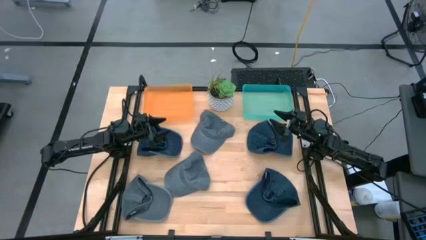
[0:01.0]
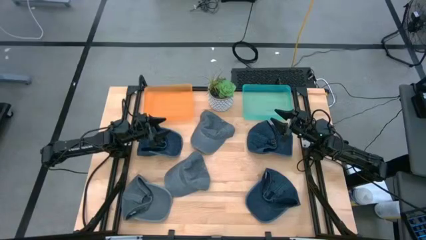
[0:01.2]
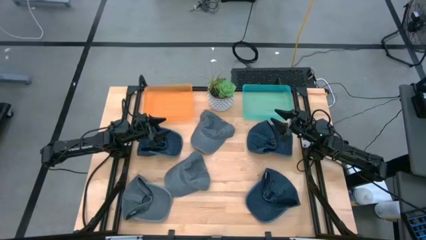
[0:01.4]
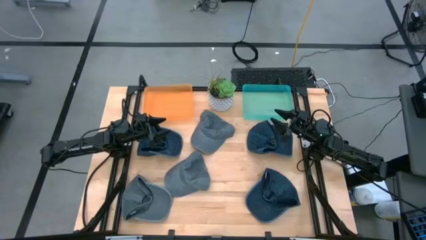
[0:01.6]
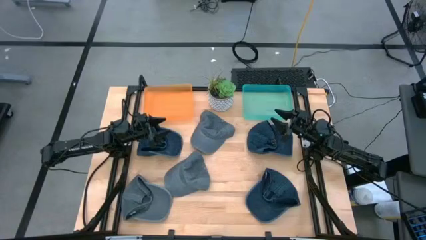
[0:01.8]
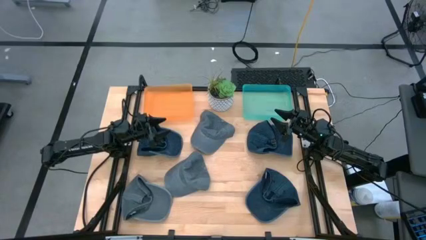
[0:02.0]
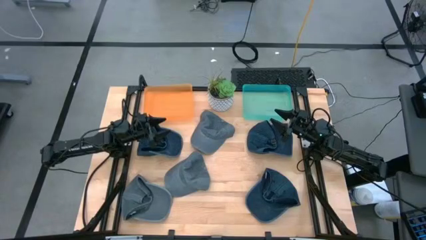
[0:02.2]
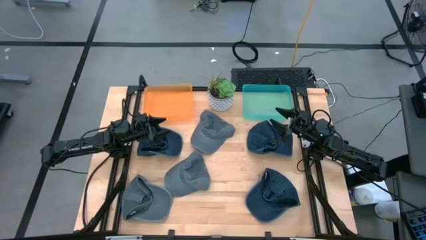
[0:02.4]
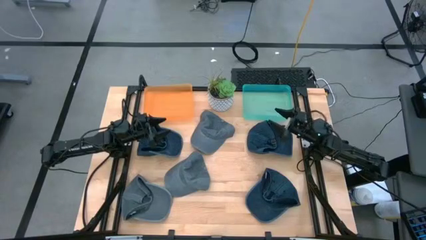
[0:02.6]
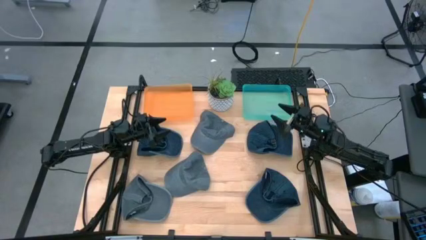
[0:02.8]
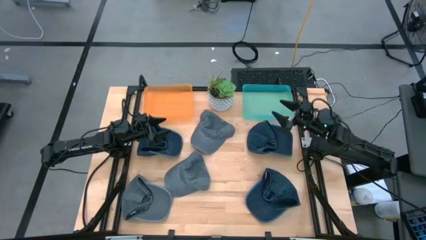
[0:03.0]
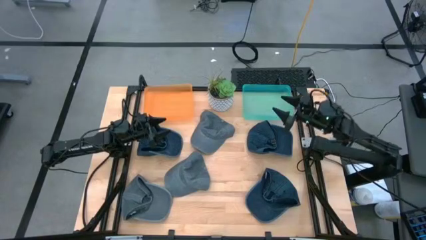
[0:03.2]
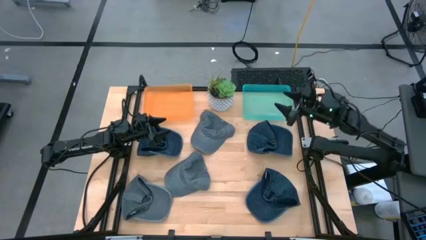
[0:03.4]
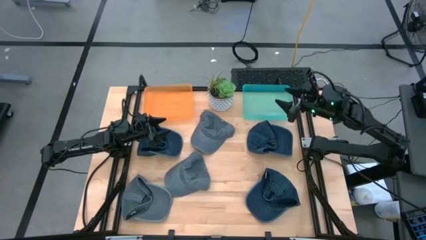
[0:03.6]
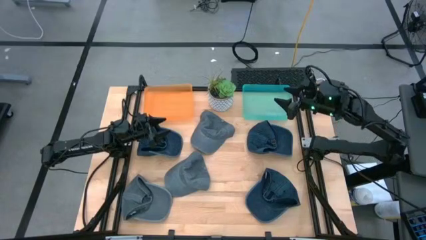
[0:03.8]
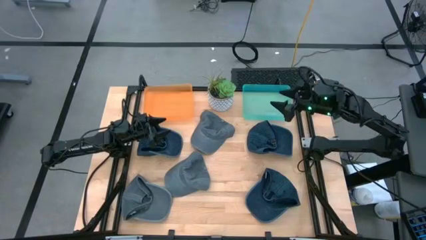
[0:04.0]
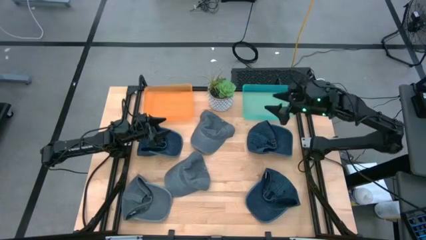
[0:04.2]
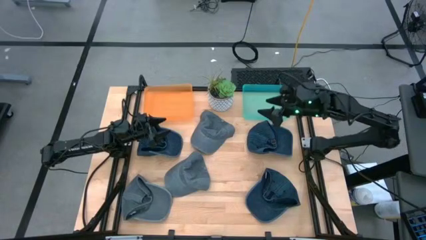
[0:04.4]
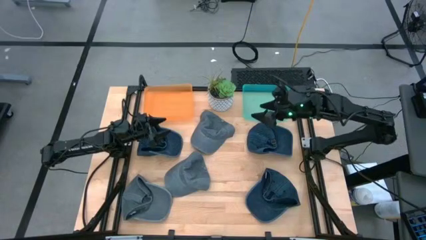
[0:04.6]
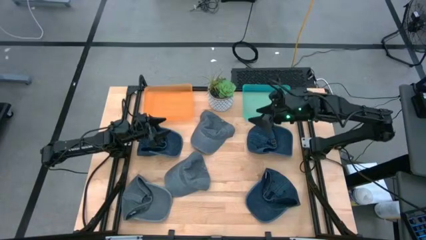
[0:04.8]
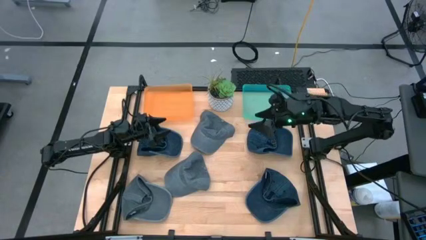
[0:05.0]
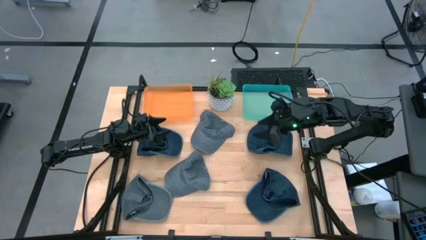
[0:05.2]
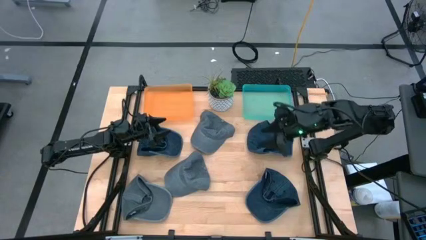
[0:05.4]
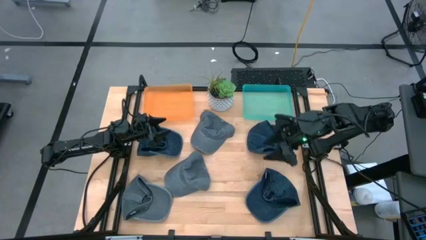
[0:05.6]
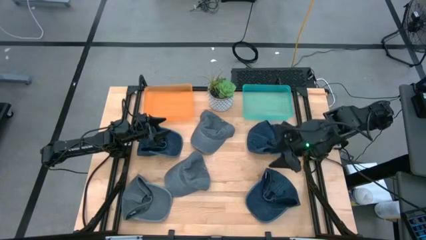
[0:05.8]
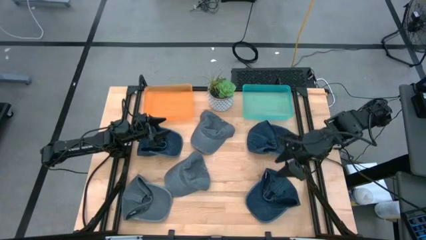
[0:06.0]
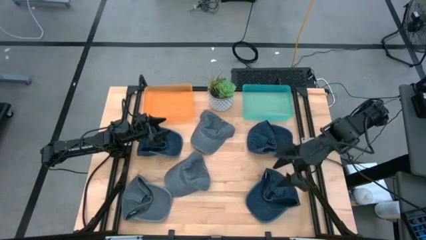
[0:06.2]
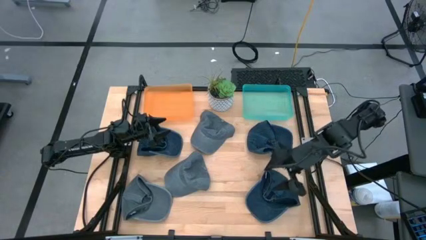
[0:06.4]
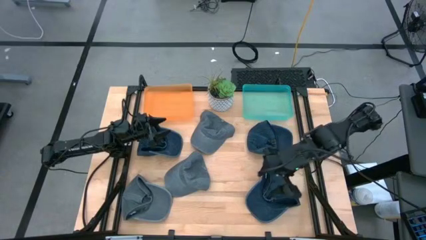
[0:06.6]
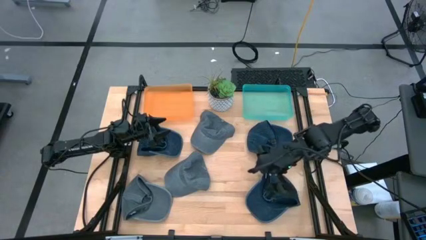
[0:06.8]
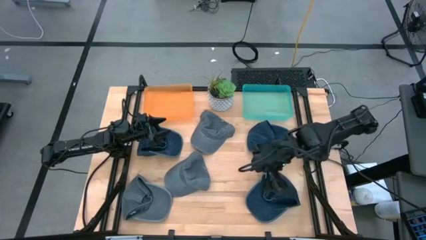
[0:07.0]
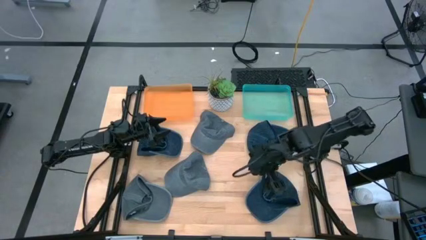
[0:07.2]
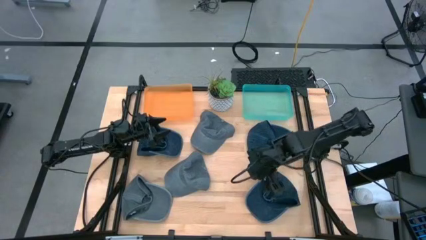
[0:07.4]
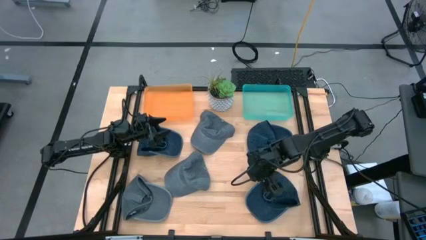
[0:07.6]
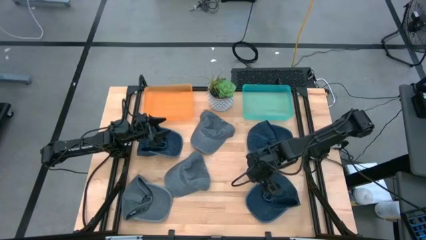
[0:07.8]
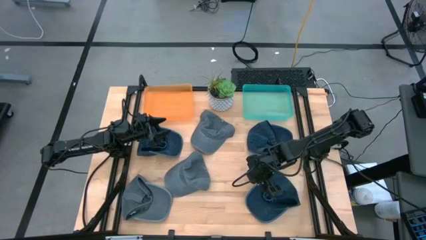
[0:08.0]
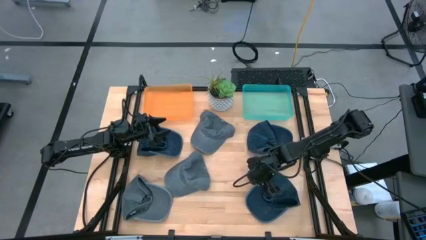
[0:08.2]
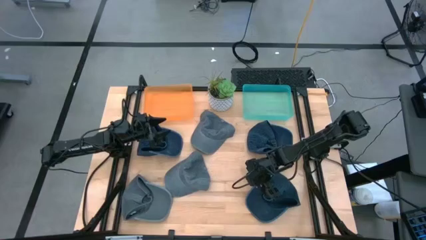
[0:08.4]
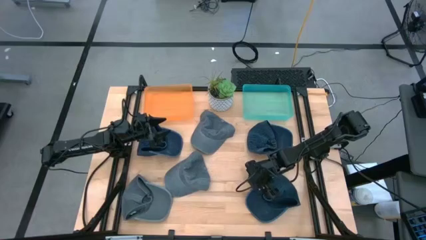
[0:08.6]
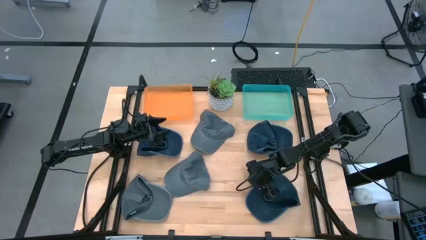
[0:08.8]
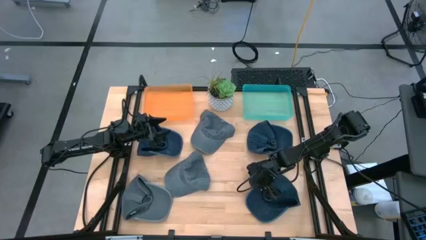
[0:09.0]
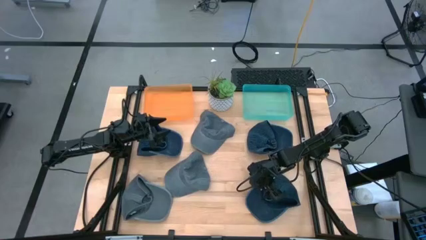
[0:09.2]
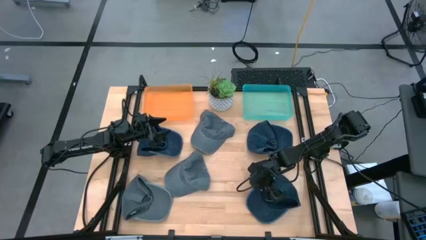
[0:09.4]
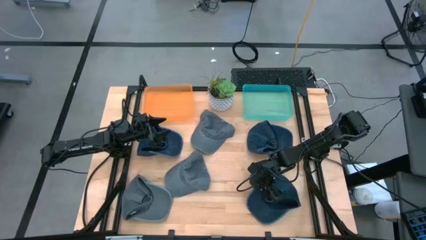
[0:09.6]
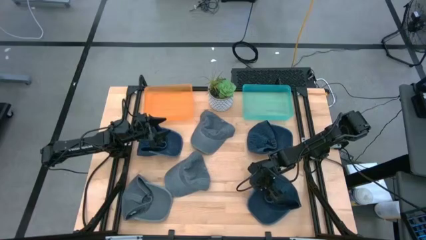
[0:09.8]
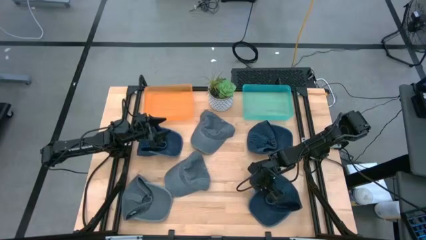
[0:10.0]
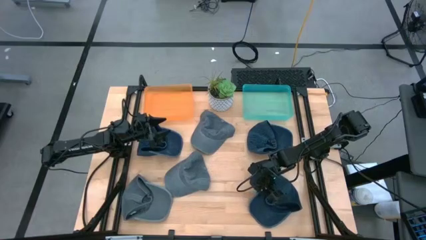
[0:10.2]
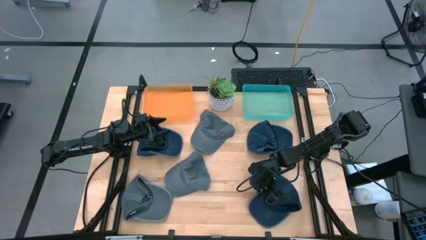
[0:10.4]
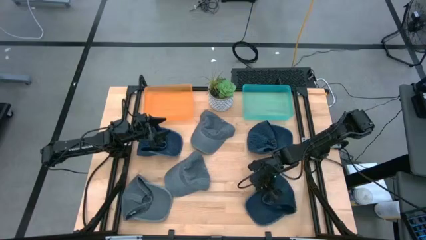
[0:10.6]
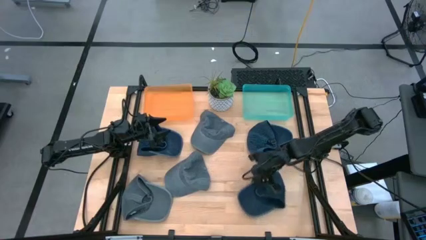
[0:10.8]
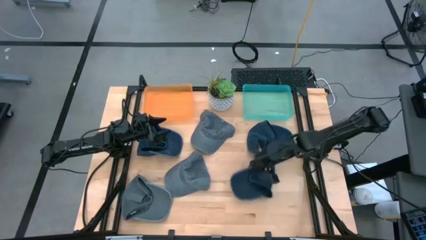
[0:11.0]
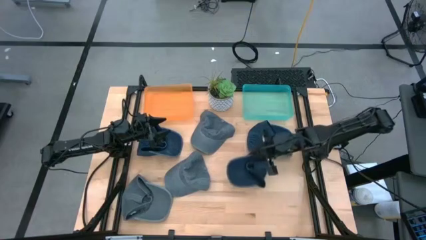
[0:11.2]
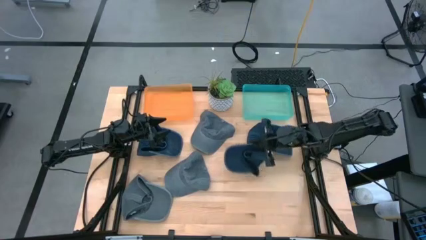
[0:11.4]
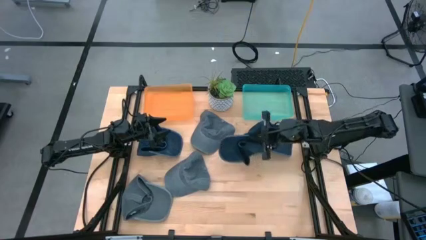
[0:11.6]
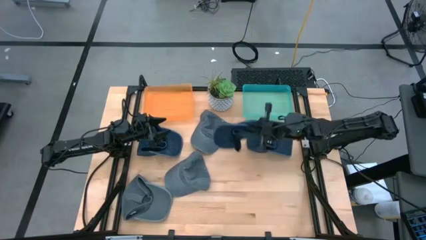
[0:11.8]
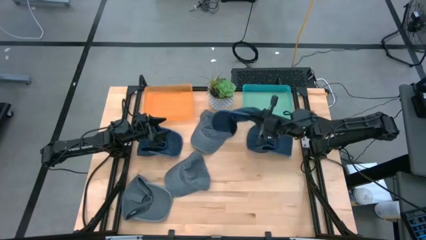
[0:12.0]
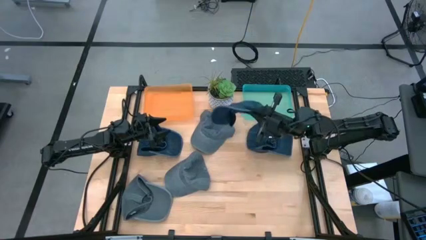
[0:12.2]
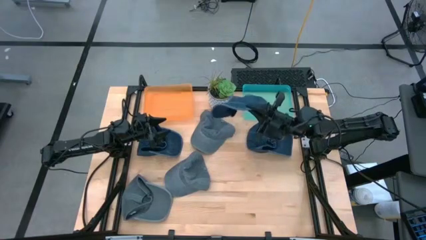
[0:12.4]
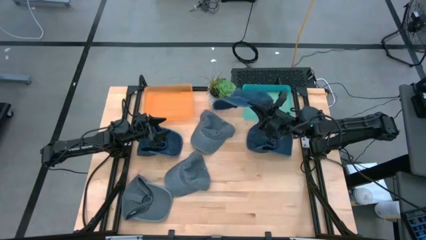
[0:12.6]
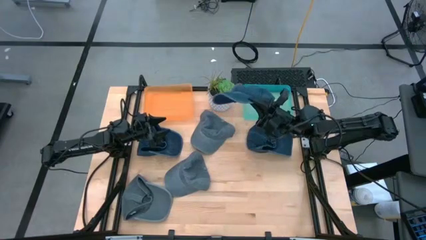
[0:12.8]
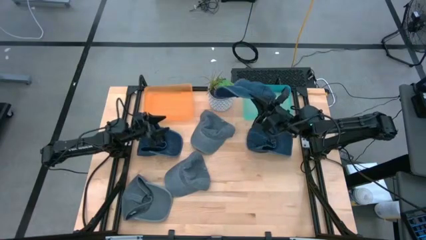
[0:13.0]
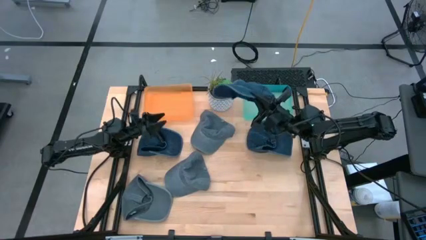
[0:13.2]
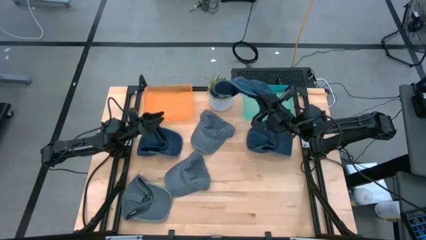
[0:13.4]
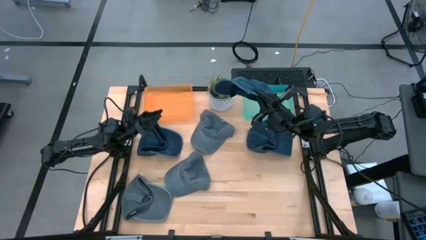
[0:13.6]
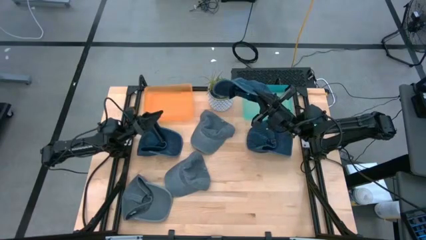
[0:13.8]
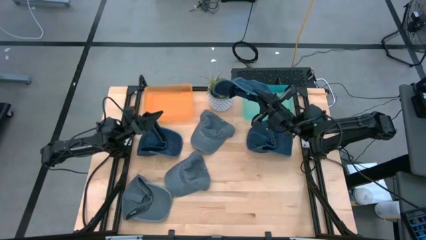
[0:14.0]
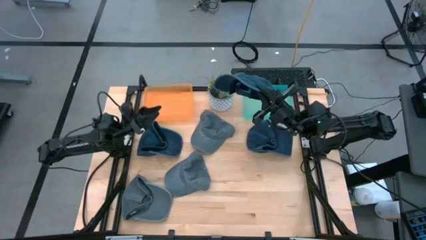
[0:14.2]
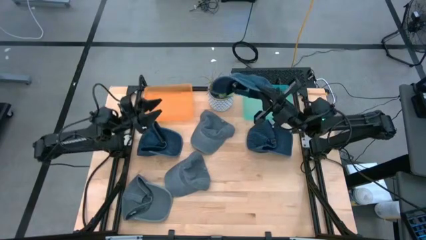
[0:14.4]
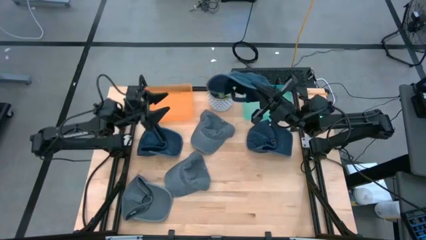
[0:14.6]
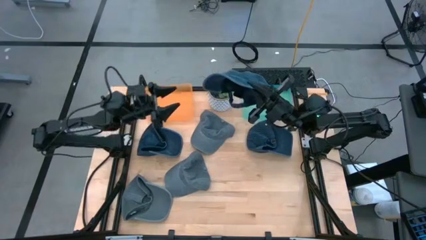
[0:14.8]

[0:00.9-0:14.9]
Task: Pick & Place hat
Put the bottom blue cap into the light blue bin
